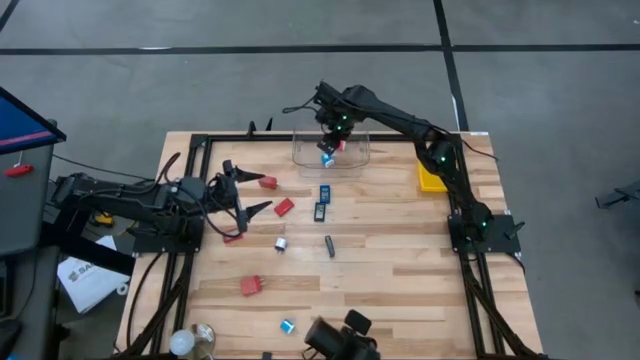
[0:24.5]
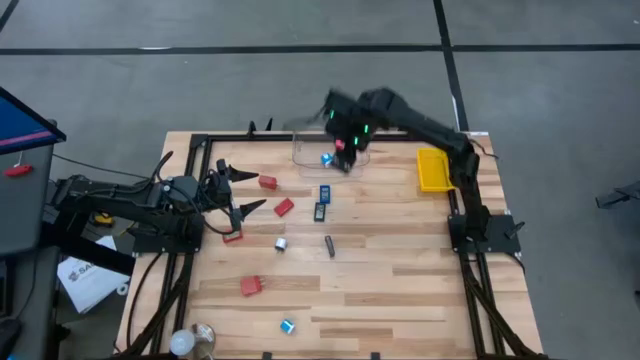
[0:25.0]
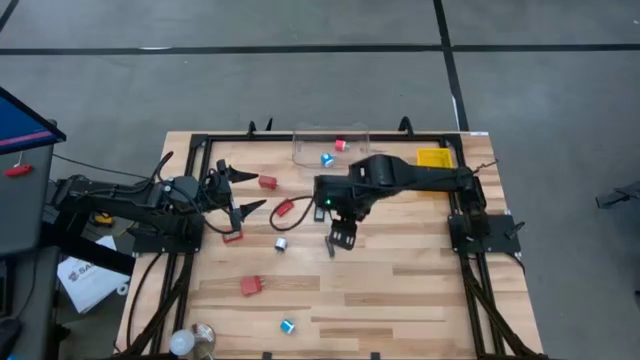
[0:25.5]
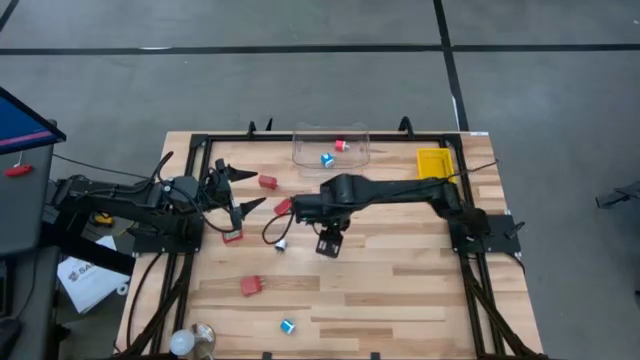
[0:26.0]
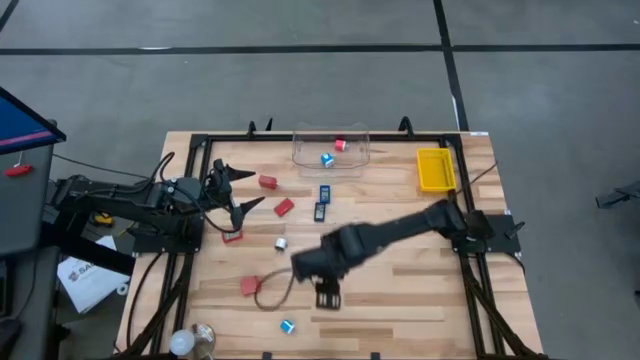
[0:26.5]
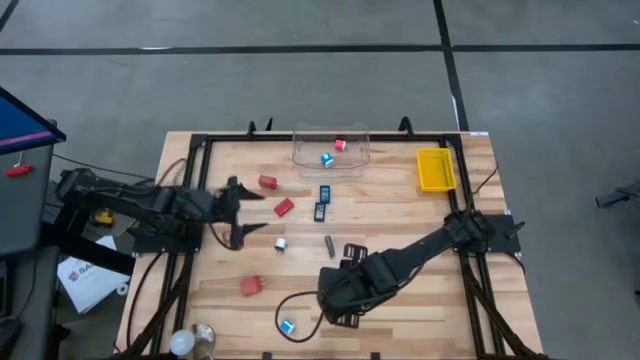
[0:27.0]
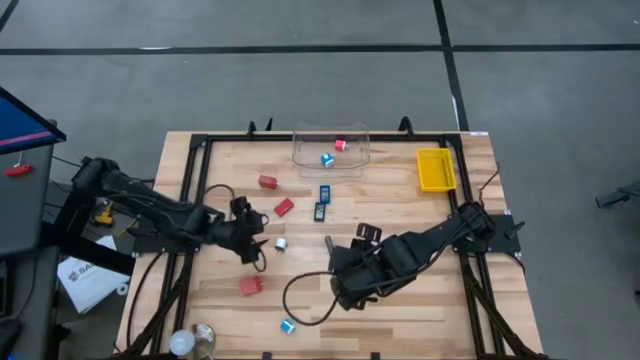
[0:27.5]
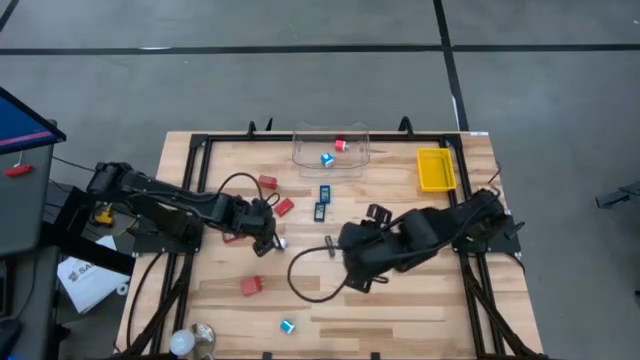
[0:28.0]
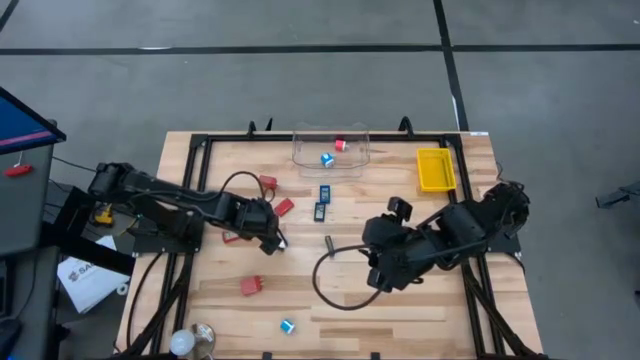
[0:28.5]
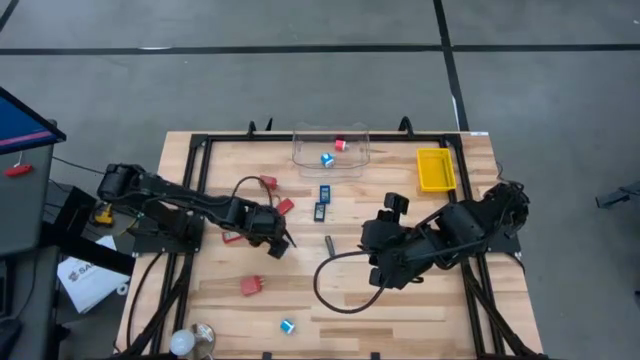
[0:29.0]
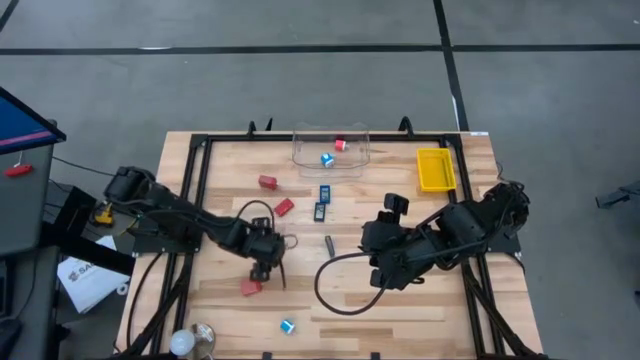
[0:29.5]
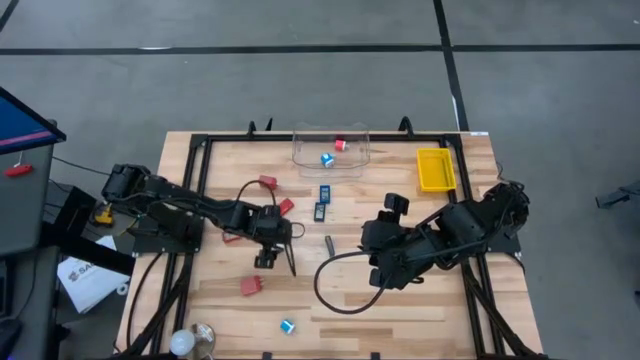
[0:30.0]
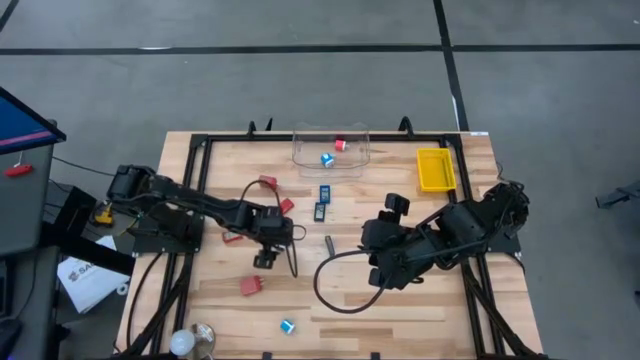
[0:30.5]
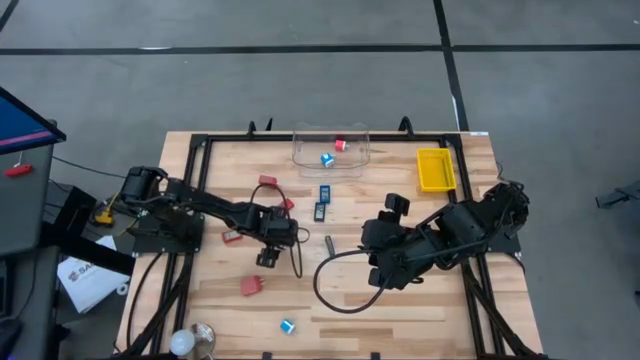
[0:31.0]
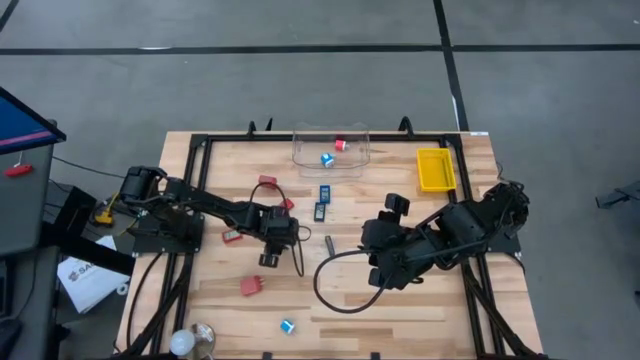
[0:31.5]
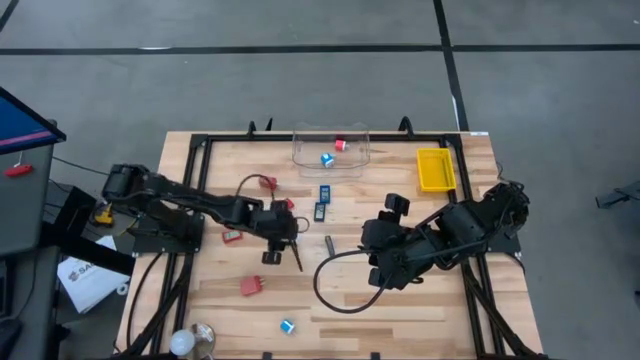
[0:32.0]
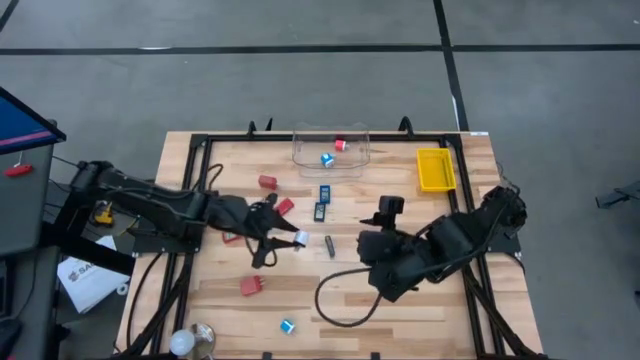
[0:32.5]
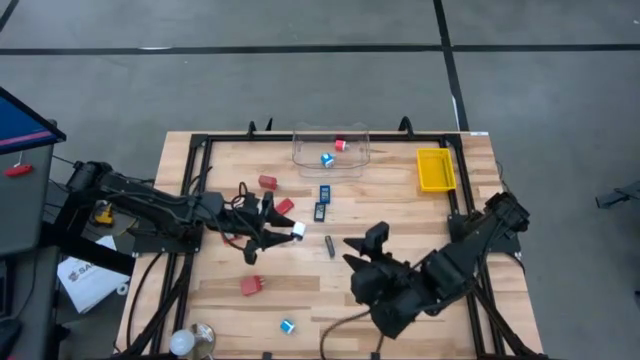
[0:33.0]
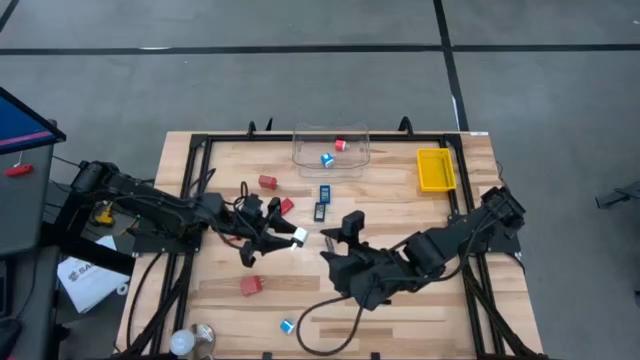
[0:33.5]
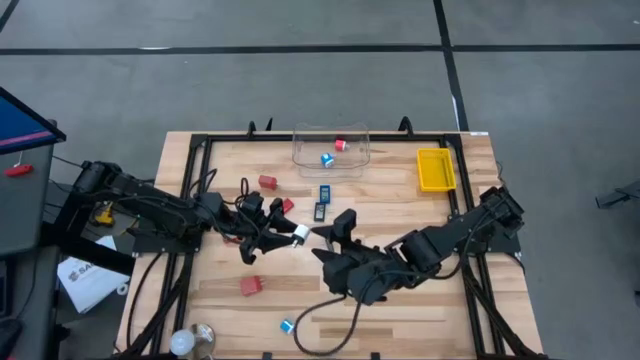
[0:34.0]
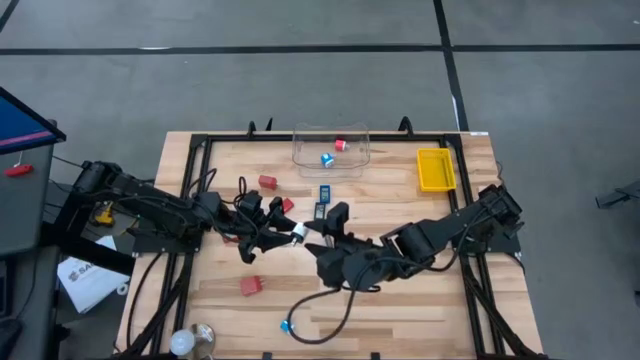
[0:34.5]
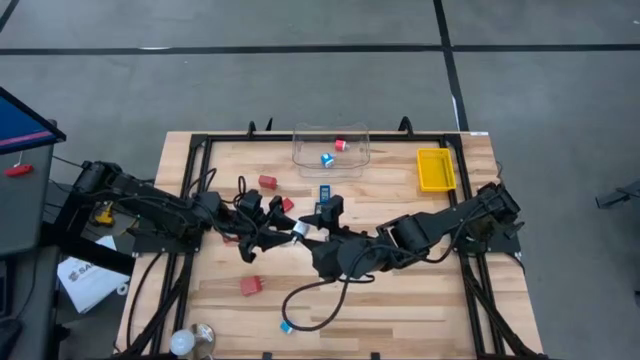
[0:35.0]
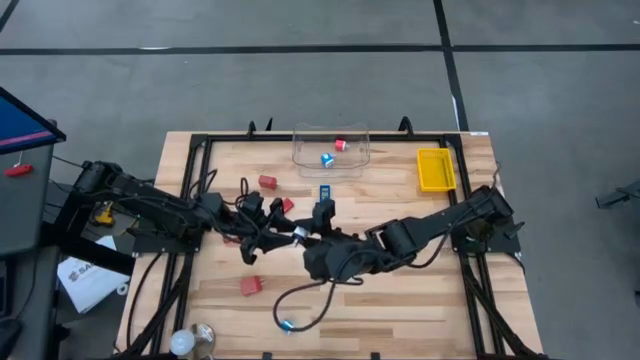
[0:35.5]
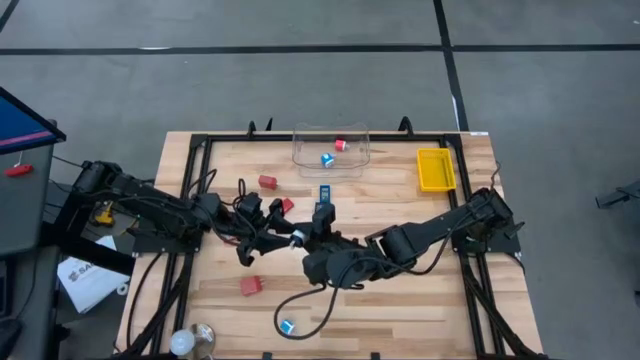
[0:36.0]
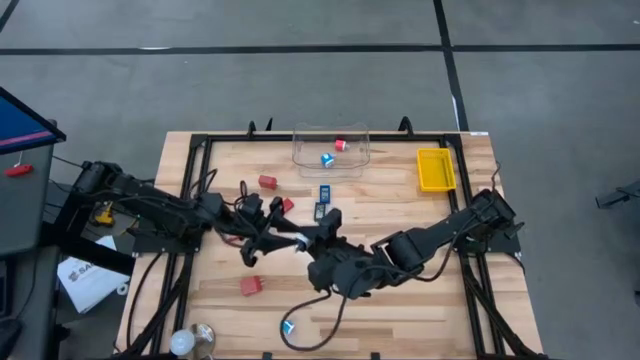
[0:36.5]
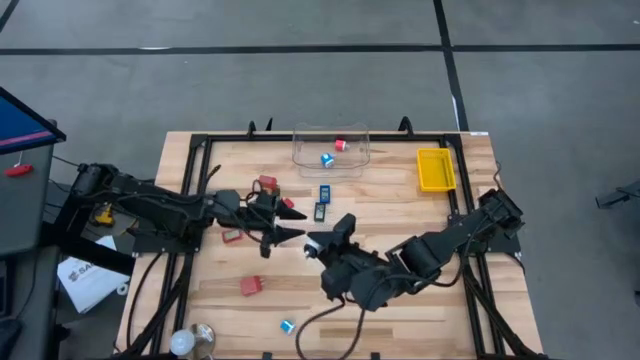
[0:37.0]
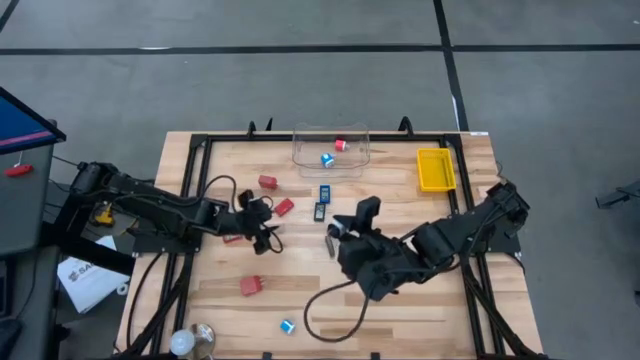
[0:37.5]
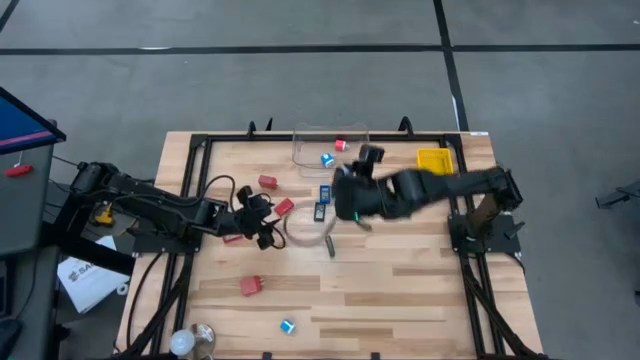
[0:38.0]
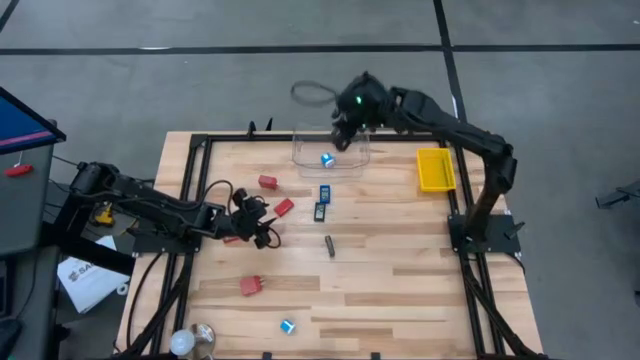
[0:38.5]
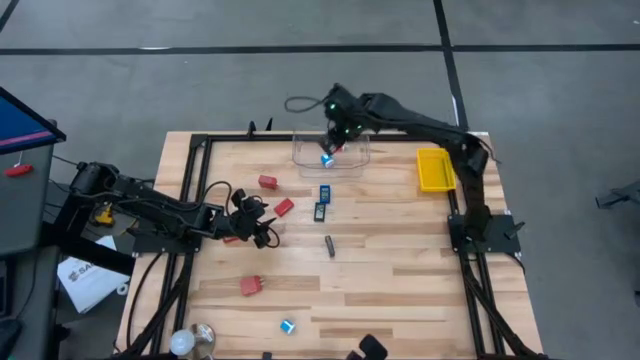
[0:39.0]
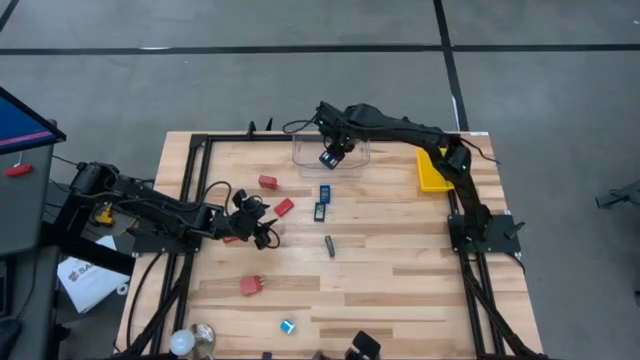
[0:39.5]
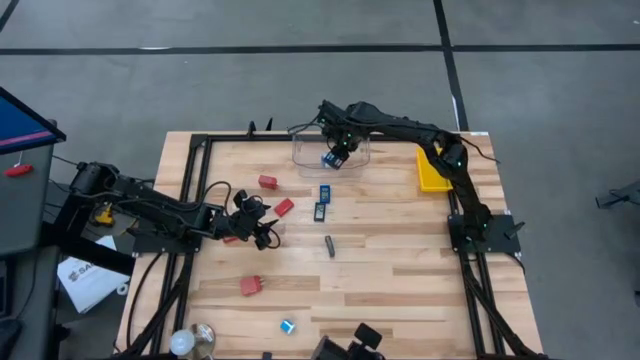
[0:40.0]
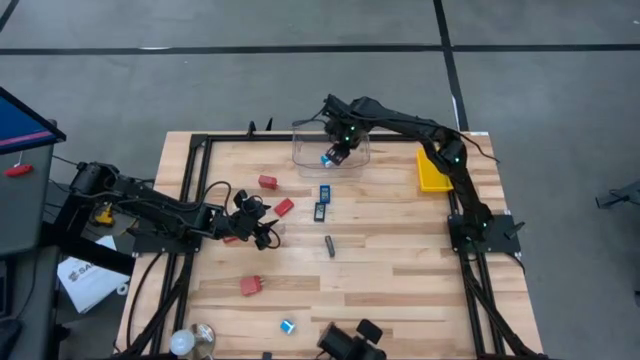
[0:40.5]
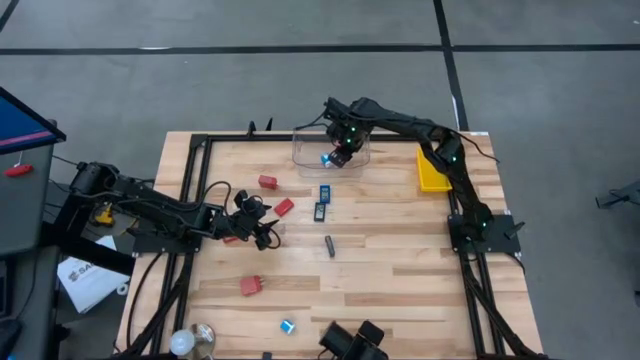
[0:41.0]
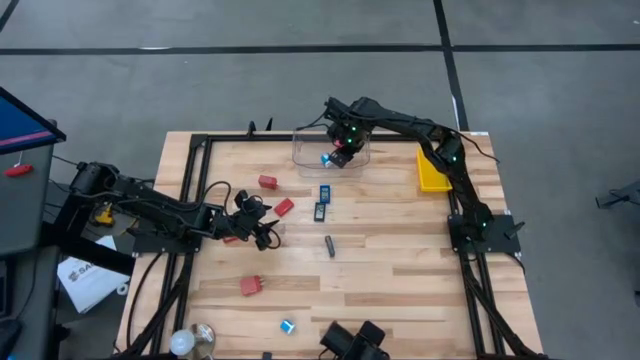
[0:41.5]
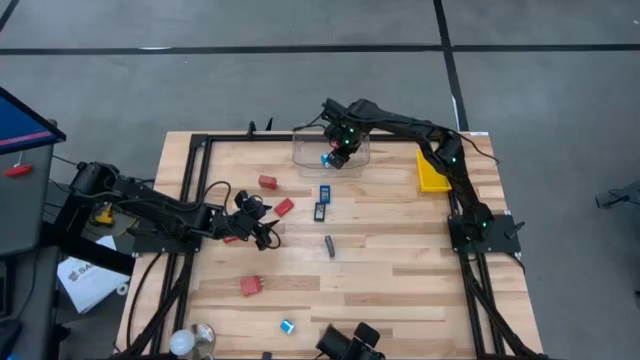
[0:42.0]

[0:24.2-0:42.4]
Task: Pick & Place Office items
Put the white charger adapter into the transparent bin

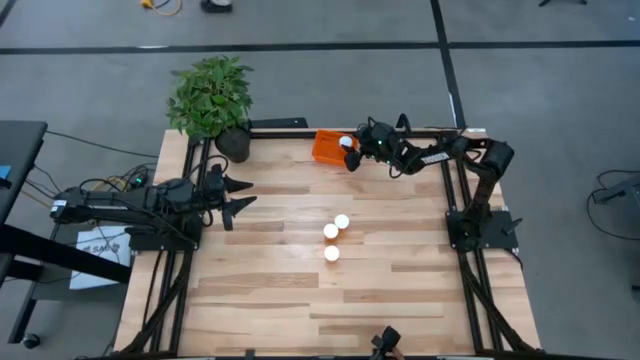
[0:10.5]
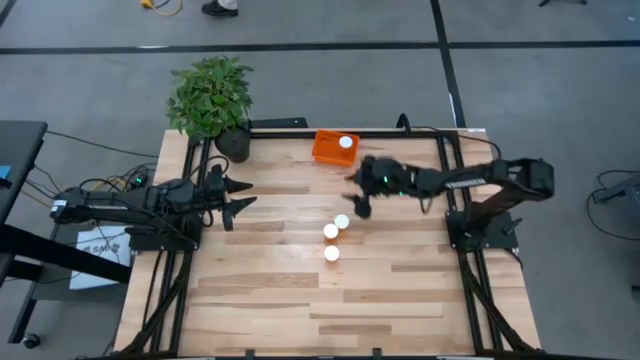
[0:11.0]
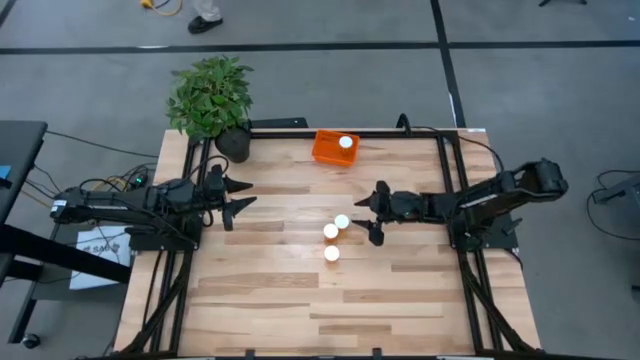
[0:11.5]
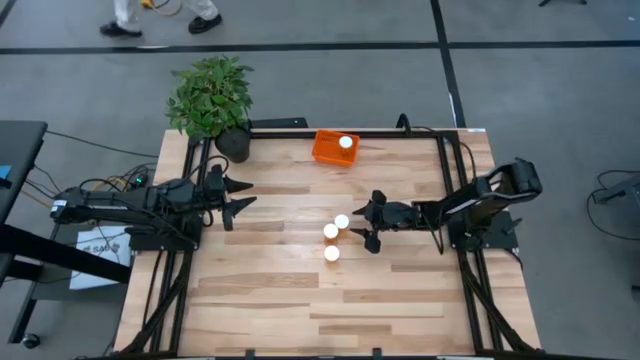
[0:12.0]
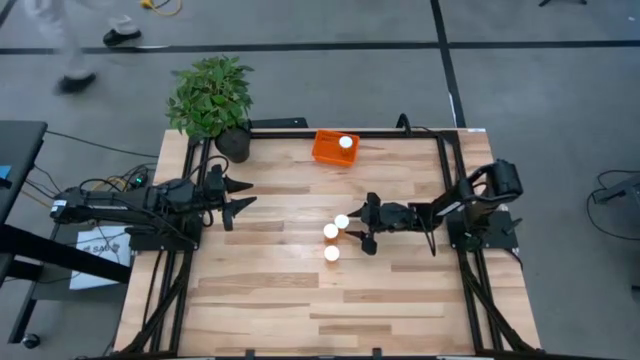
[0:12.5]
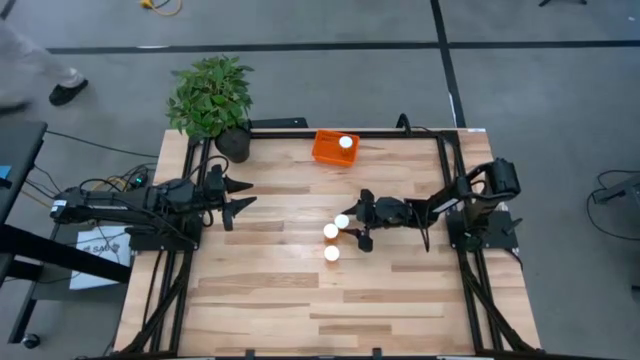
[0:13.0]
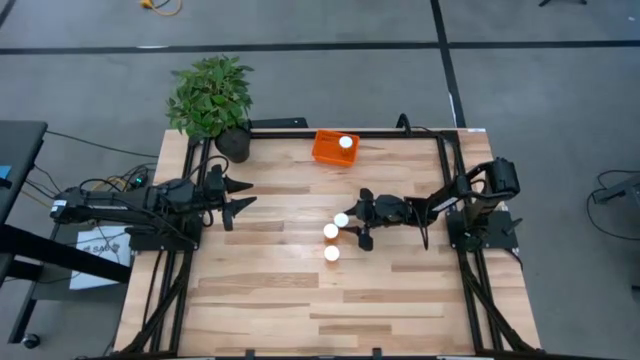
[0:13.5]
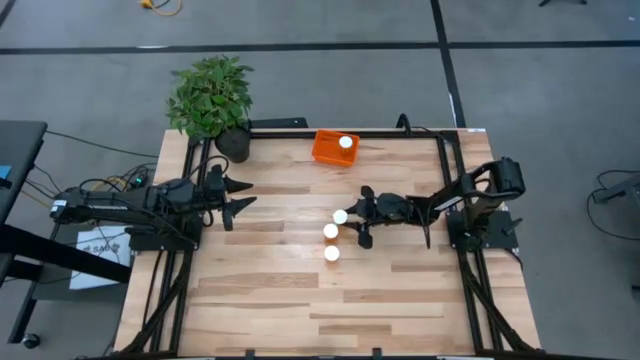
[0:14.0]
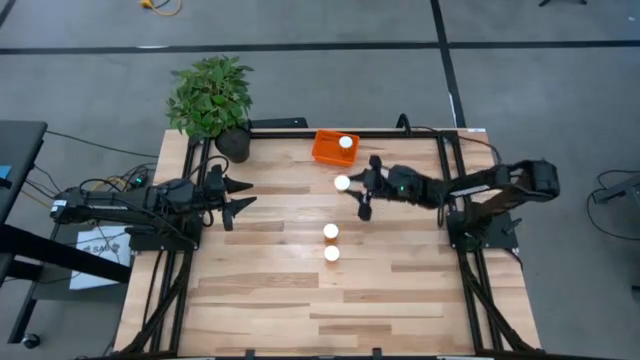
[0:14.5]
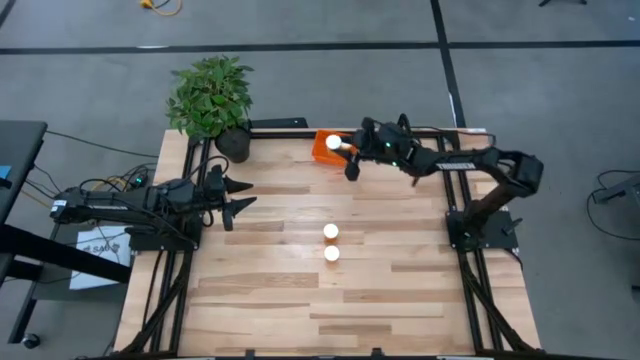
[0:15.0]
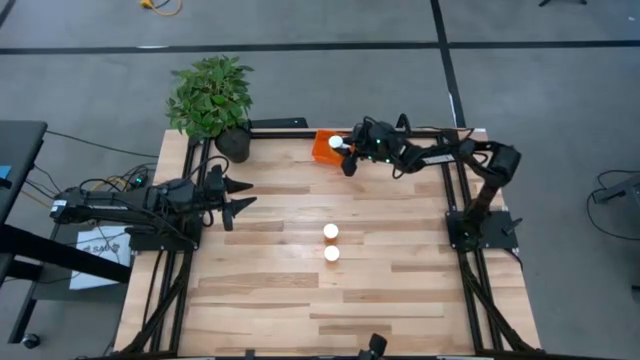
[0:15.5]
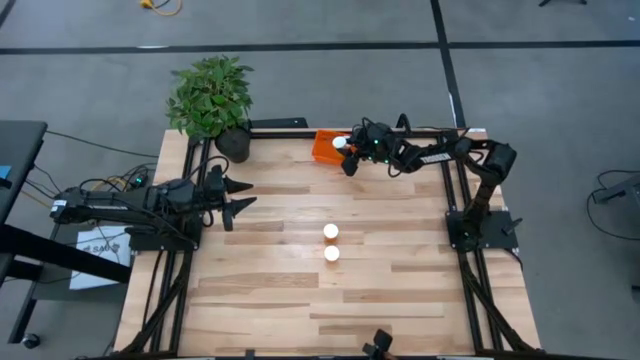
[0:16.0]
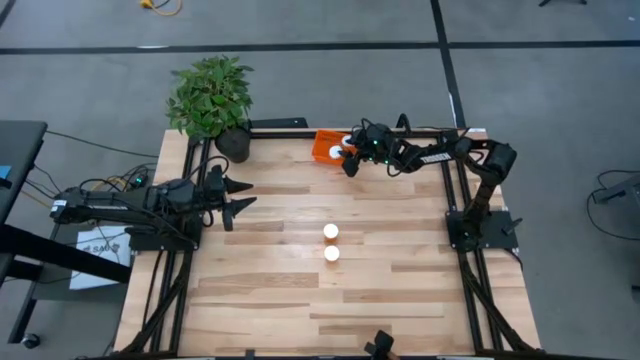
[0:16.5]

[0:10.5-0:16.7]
Task: Pick and place pill bottles into a basket
Put the orange medicine bottle into the orange bin
